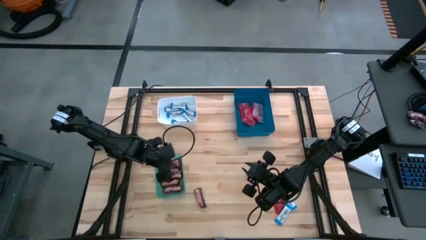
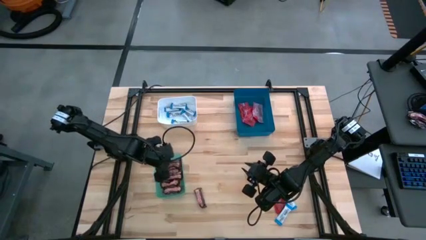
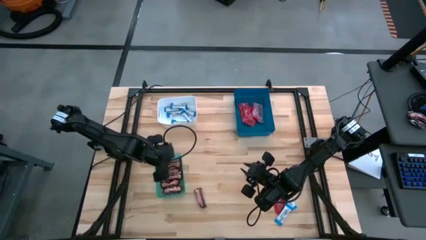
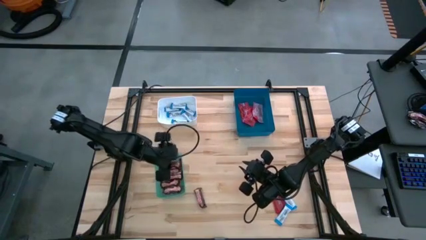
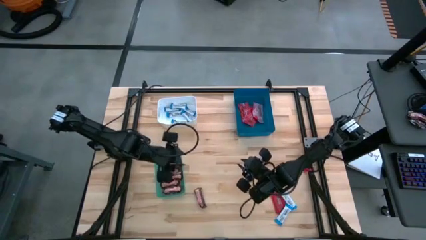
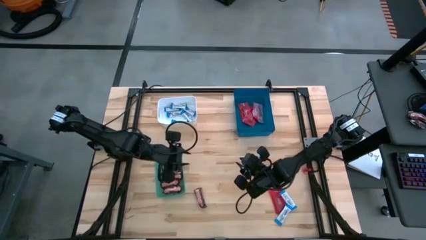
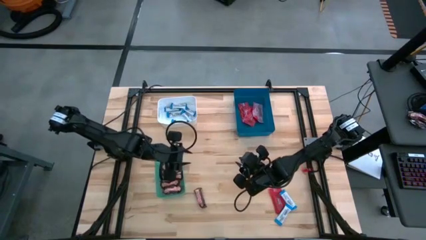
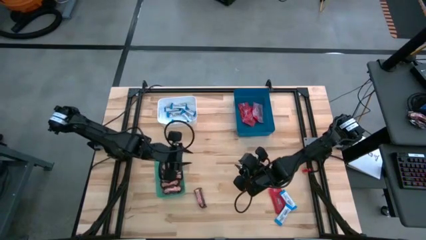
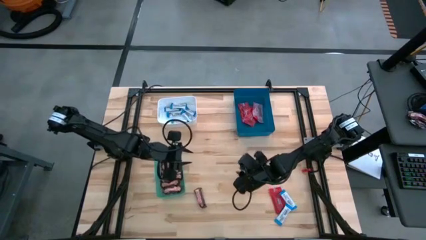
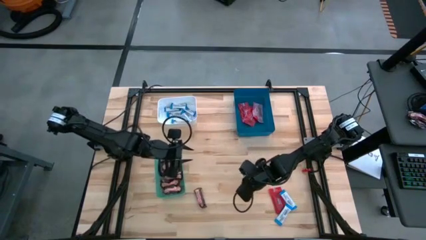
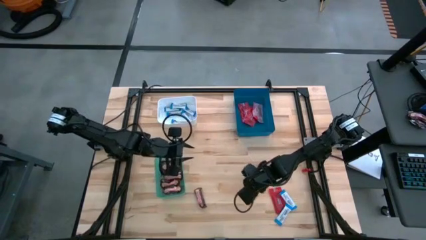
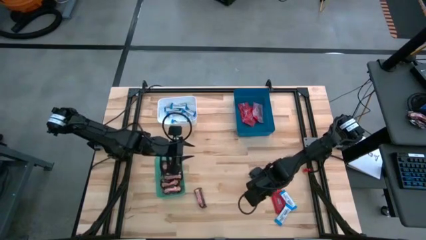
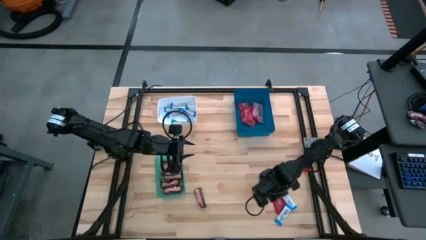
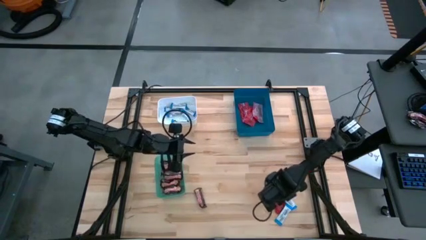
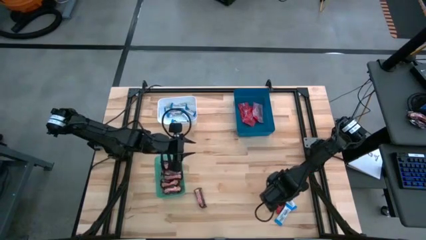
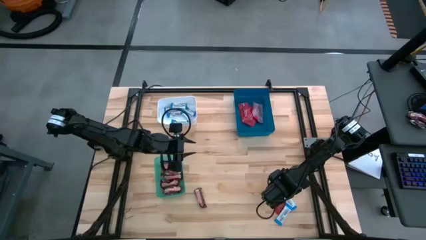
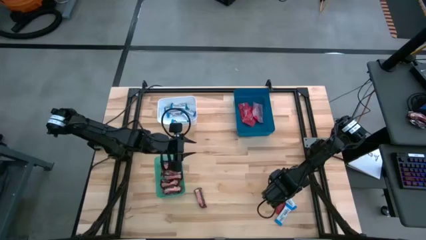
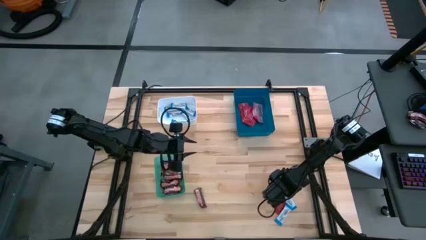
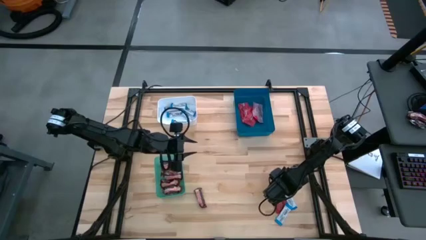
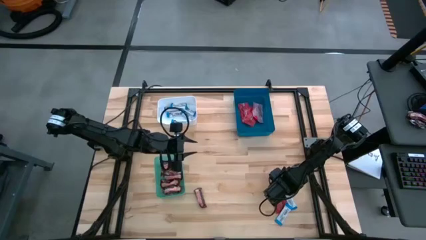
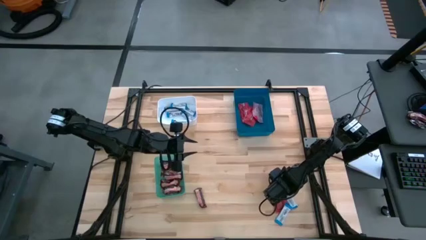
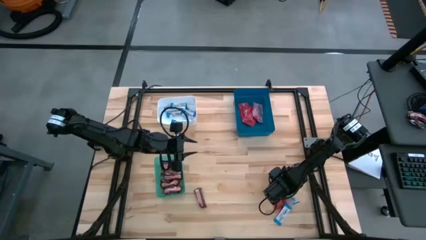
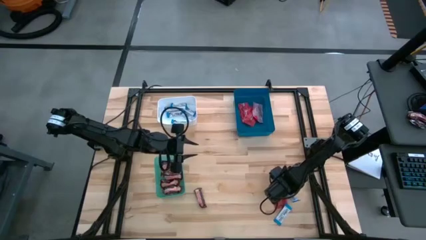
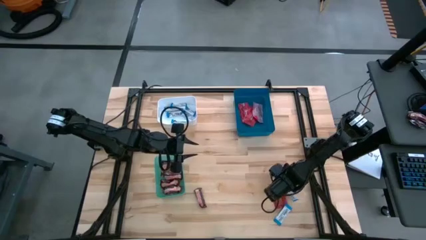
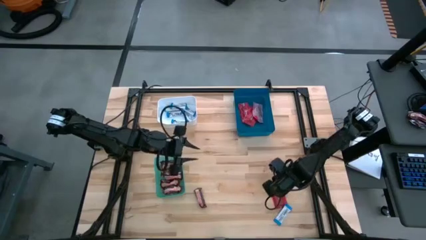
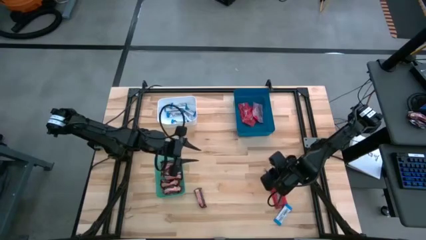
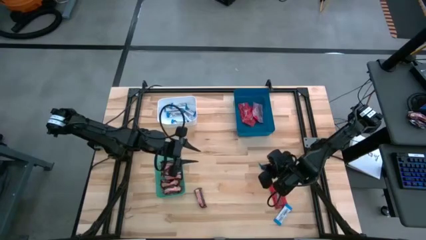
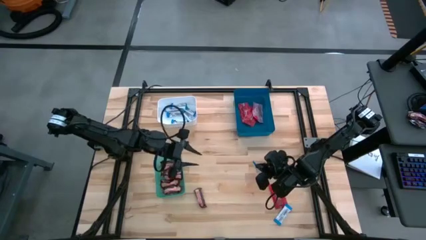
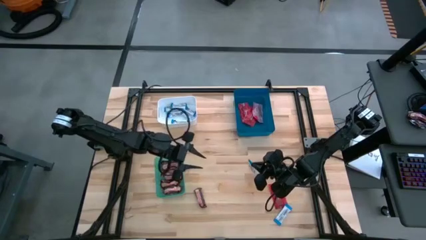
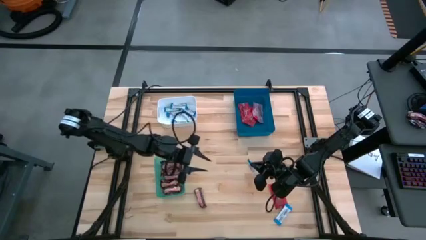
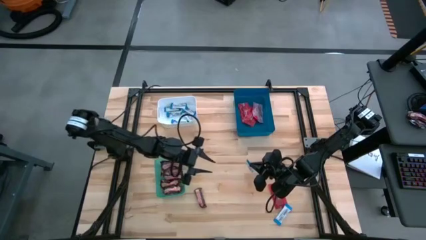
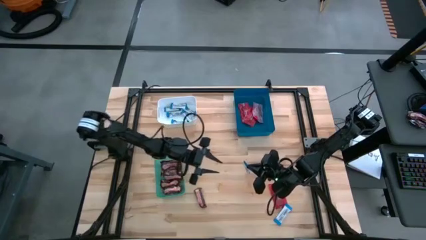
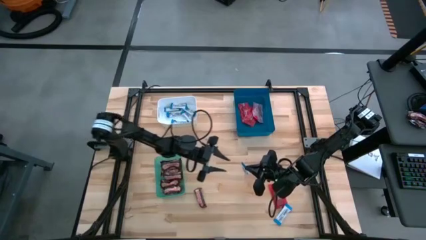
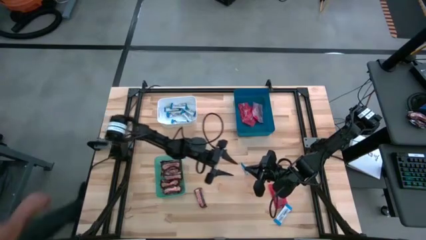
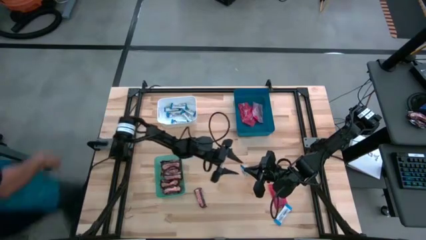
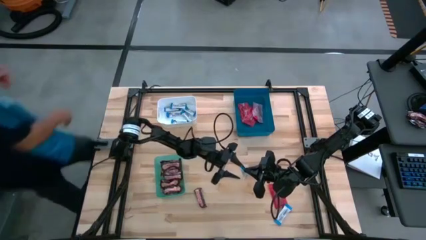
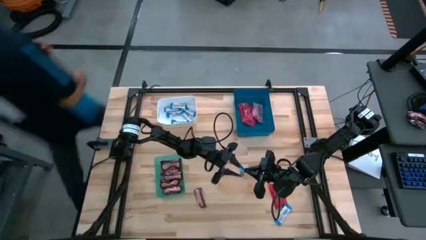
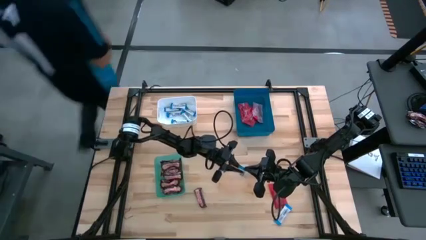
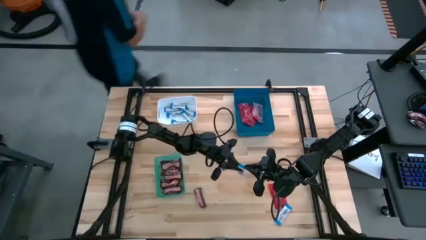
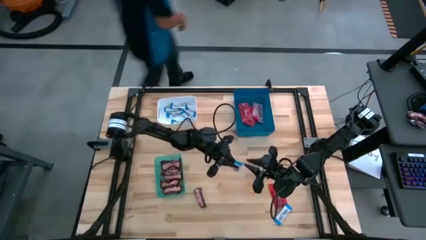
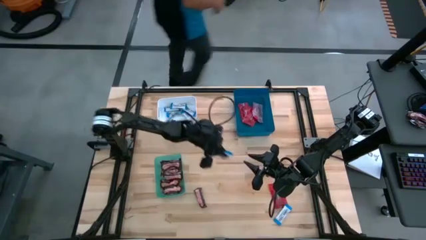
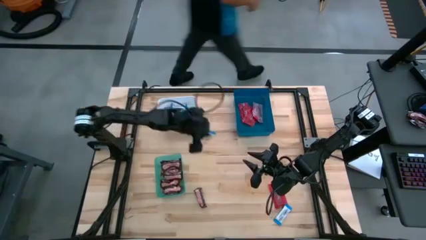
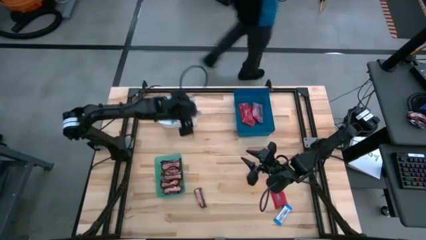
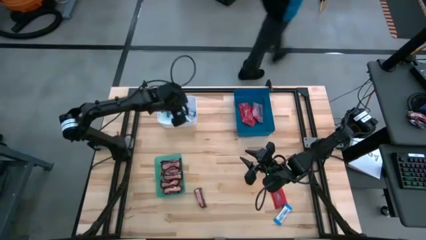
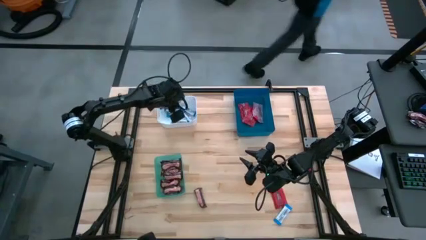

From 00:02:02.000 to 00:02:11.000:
Task: Sort candy
Put the white chocolate bar into the white bin

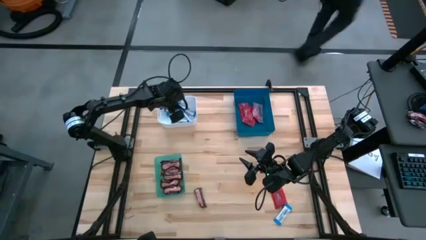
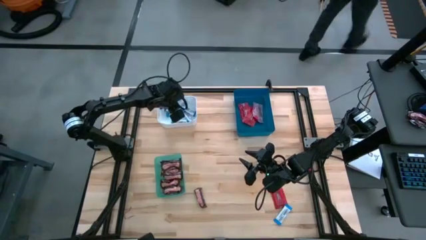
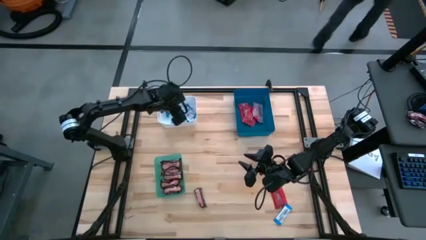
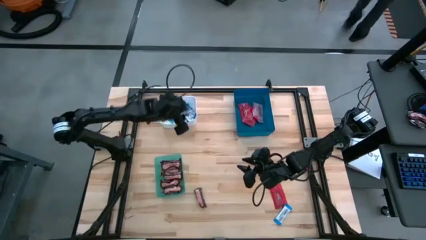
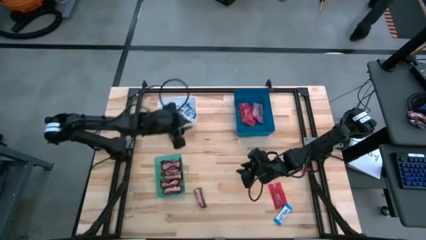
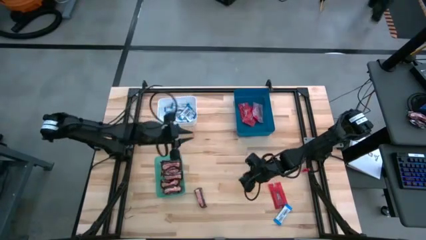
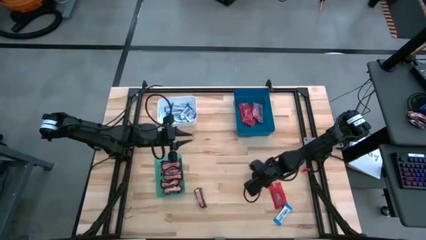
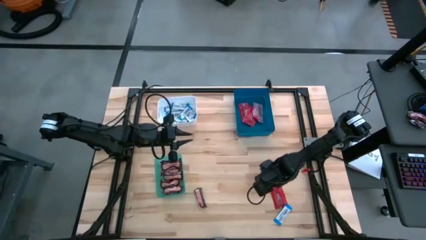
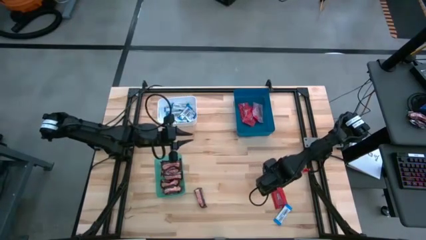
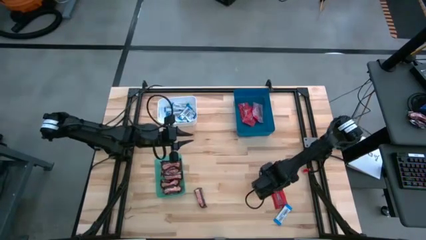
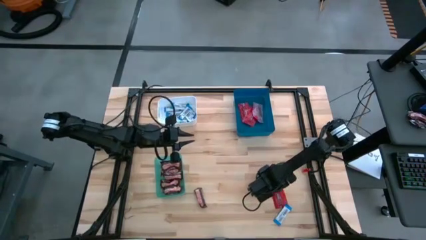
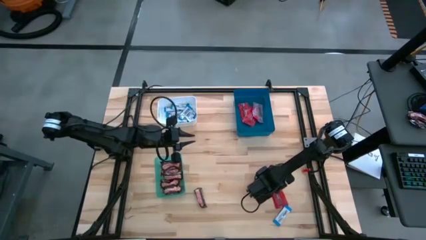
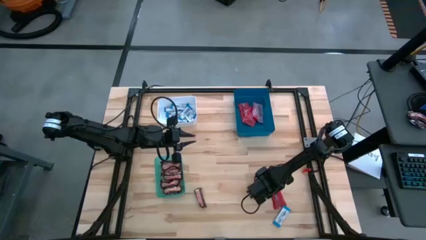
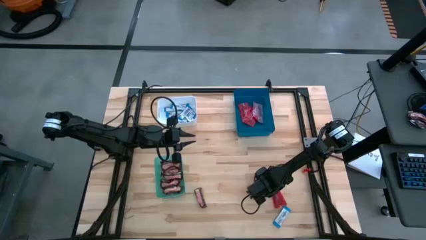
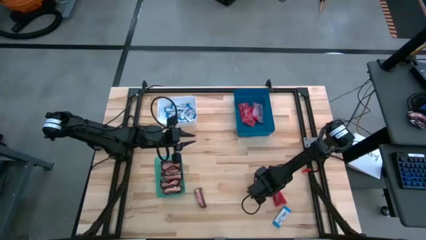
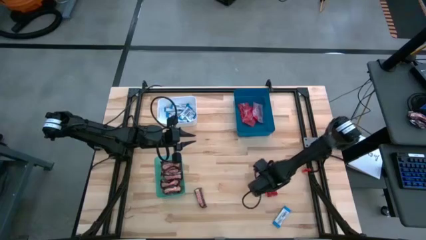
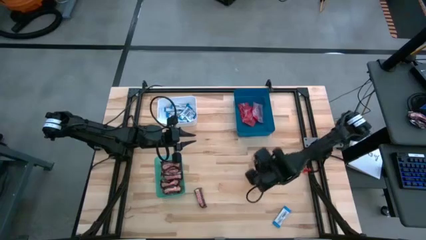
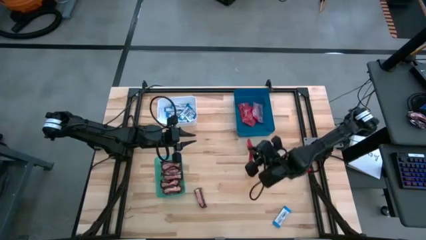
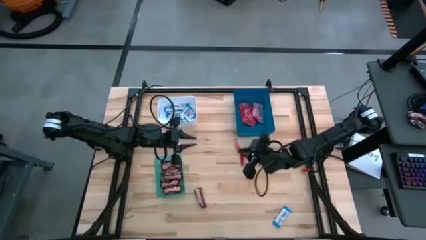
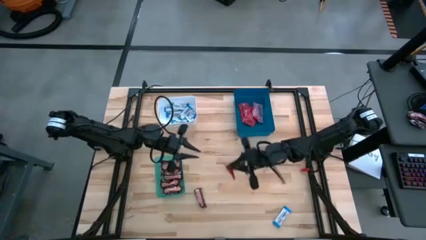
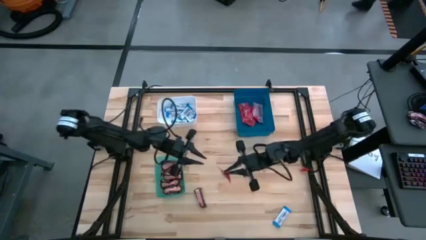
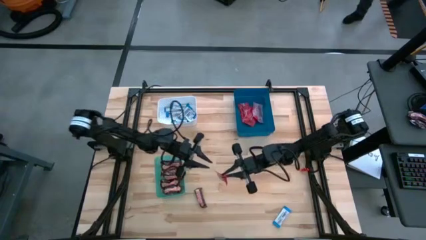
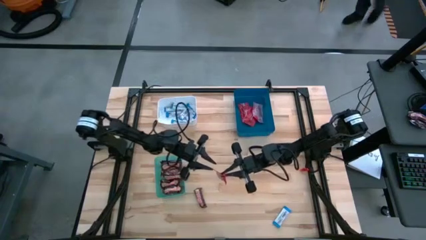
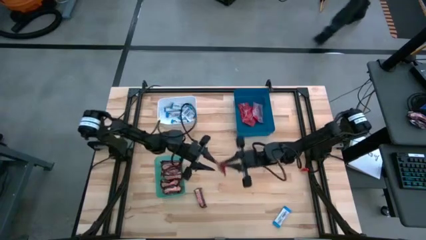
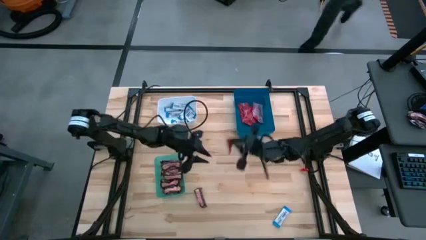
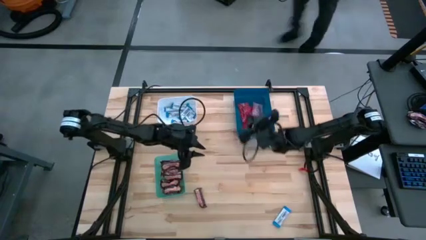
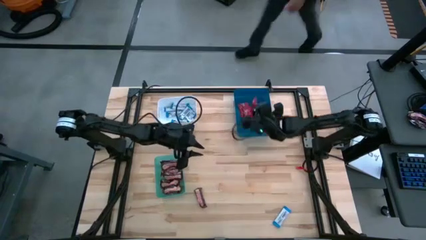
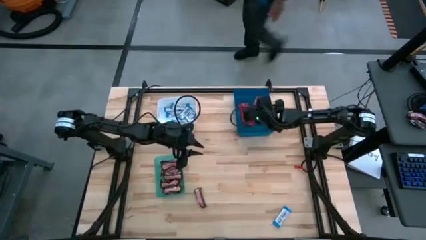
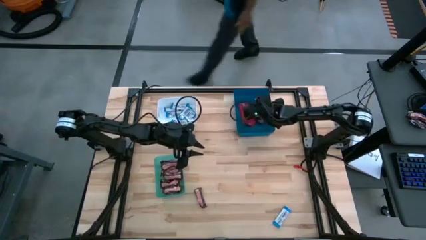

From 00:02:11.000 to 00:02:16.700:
Put the red candy into the blue bin

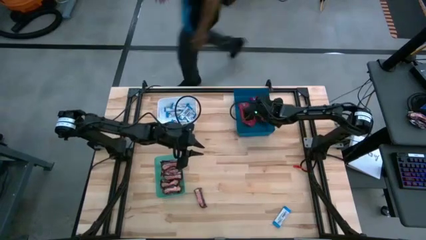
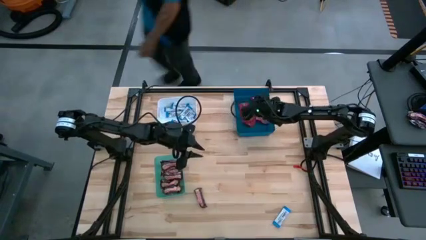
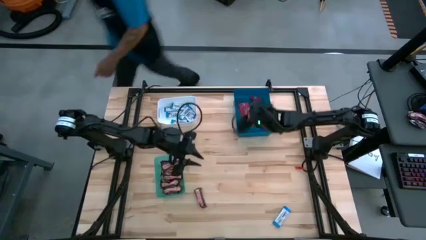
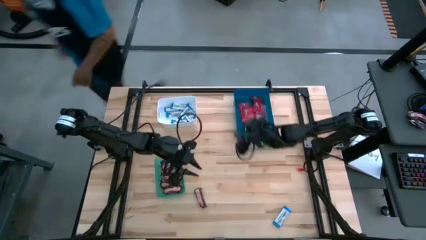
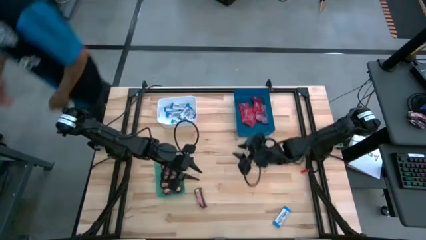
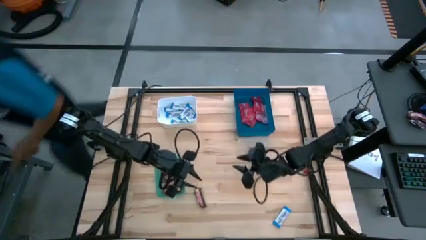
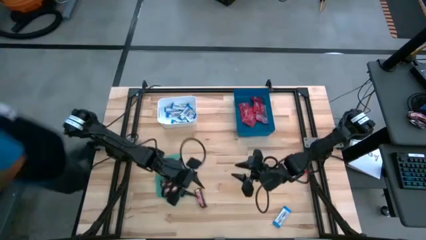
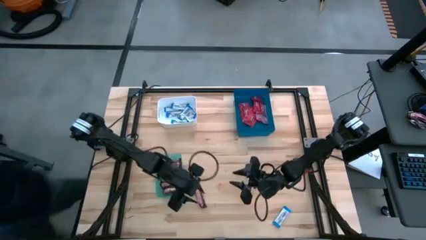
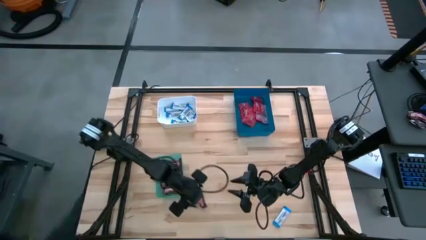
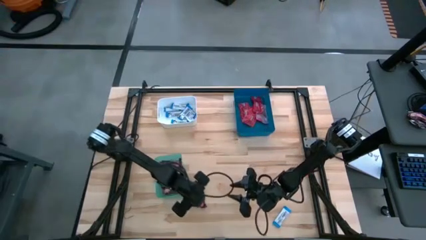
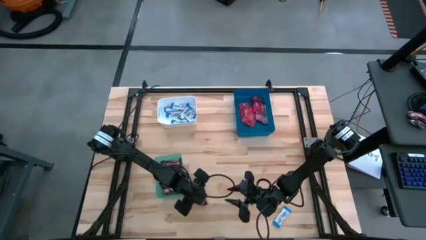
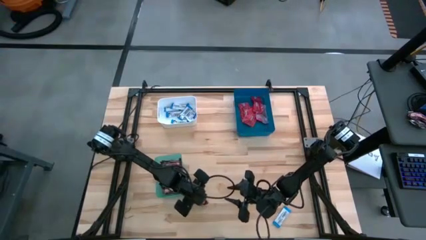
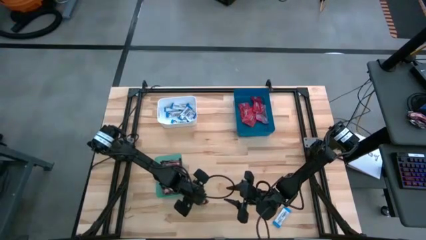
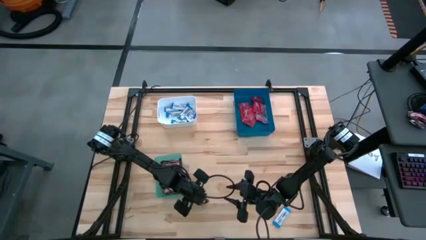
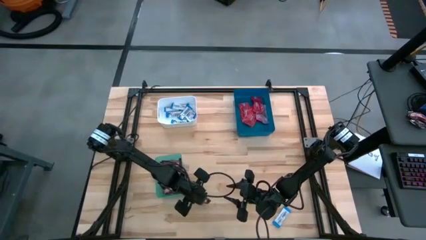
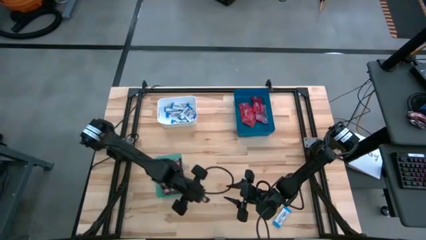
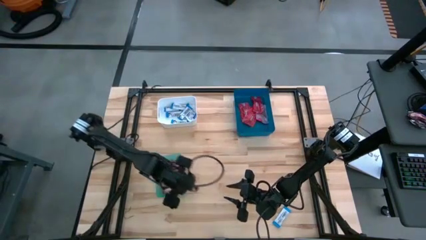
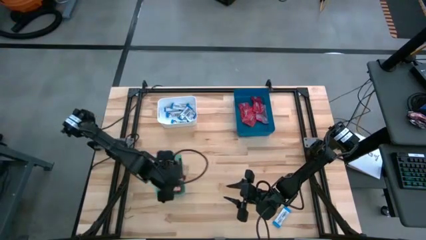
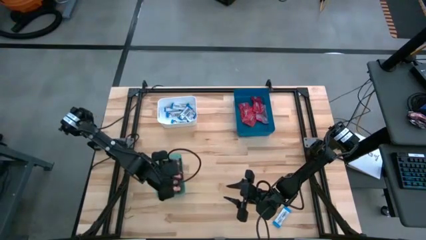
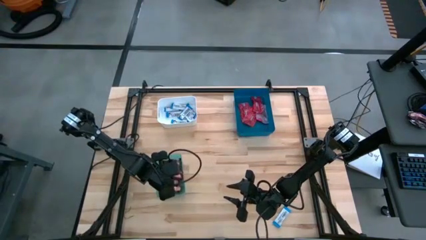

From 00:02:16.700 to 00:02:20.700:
Put the brown chocolate bar into the green bin
